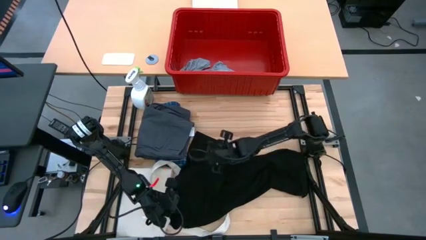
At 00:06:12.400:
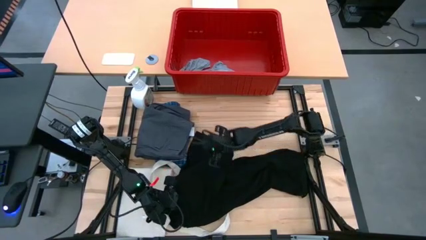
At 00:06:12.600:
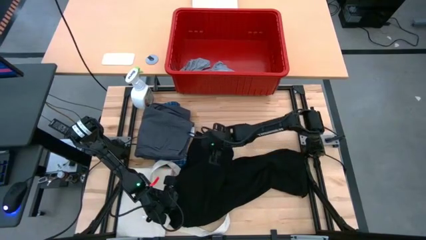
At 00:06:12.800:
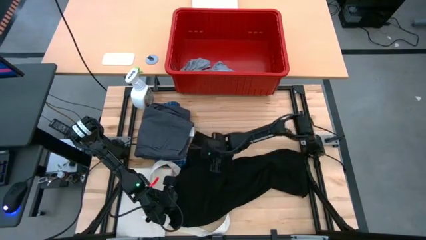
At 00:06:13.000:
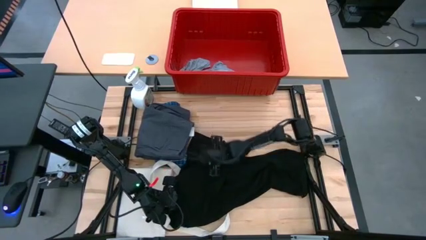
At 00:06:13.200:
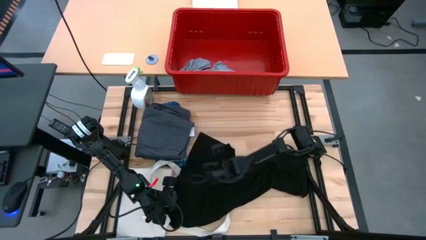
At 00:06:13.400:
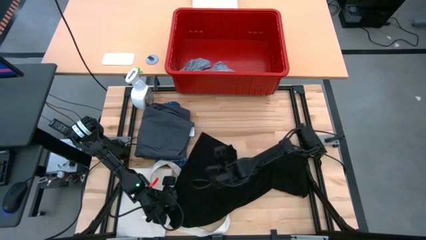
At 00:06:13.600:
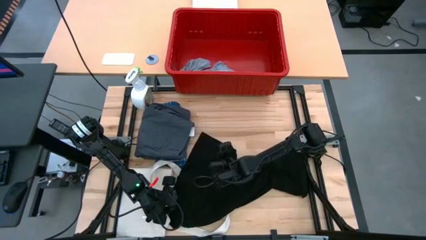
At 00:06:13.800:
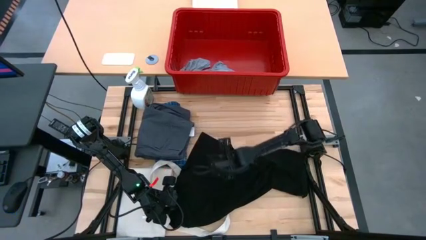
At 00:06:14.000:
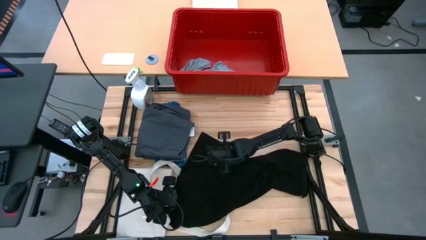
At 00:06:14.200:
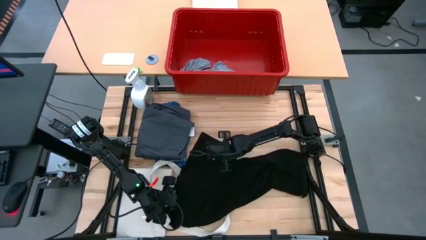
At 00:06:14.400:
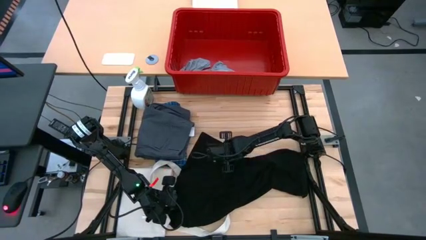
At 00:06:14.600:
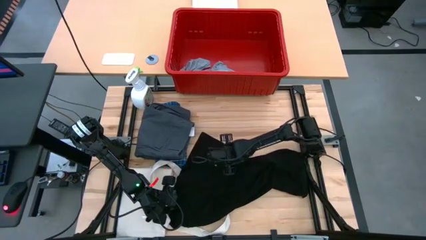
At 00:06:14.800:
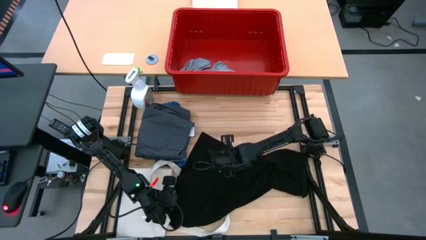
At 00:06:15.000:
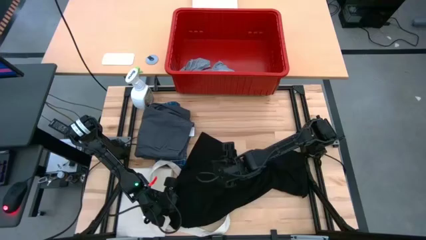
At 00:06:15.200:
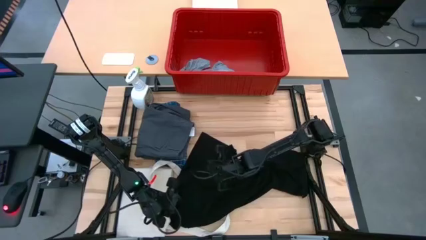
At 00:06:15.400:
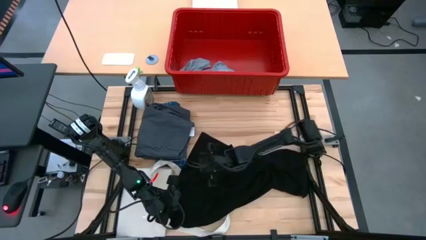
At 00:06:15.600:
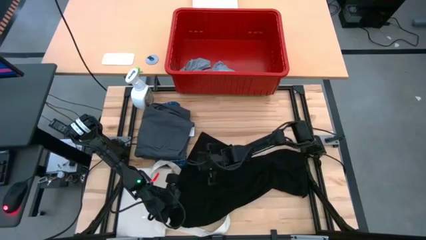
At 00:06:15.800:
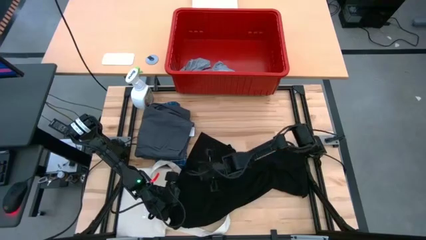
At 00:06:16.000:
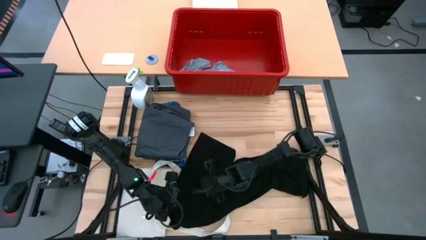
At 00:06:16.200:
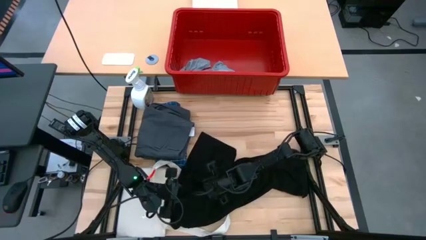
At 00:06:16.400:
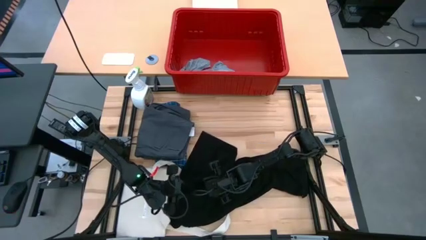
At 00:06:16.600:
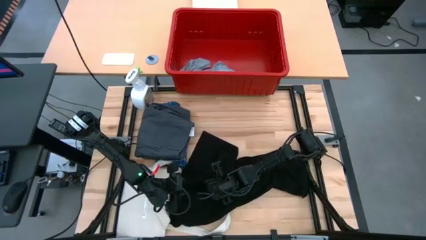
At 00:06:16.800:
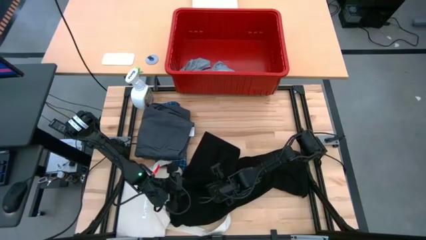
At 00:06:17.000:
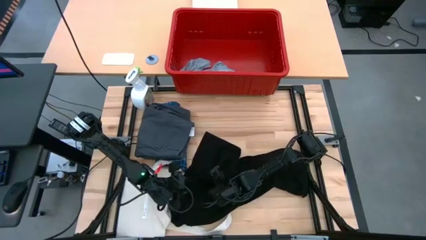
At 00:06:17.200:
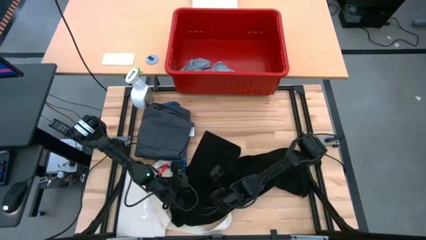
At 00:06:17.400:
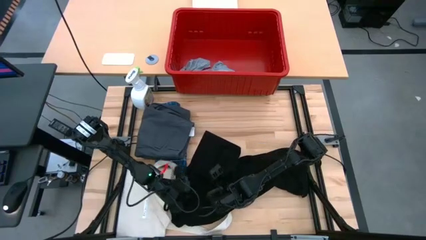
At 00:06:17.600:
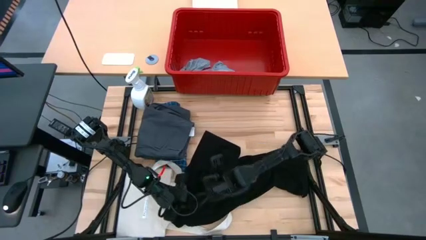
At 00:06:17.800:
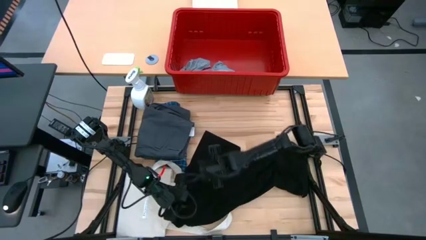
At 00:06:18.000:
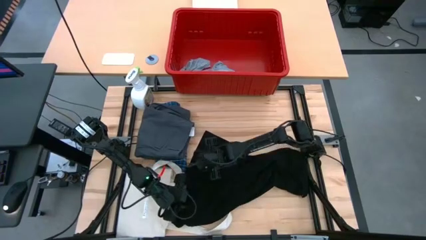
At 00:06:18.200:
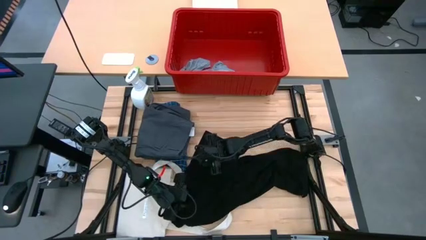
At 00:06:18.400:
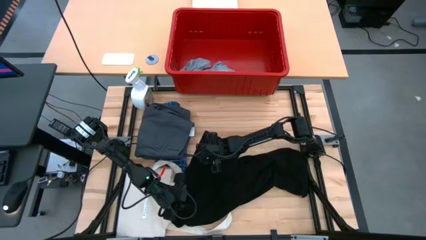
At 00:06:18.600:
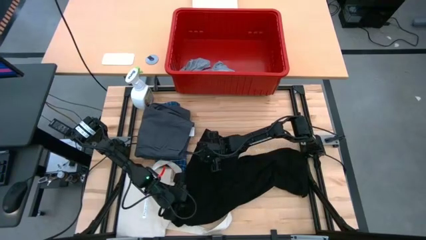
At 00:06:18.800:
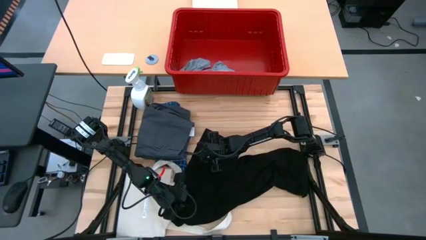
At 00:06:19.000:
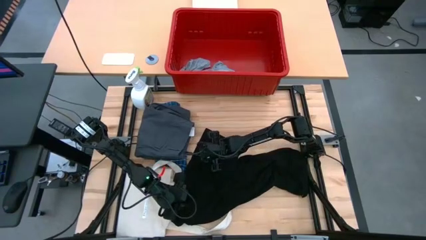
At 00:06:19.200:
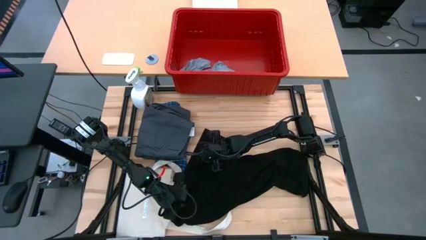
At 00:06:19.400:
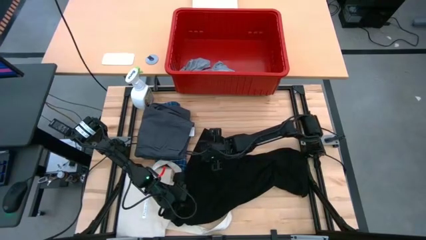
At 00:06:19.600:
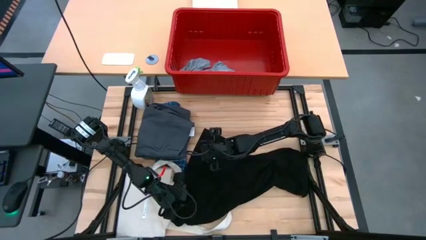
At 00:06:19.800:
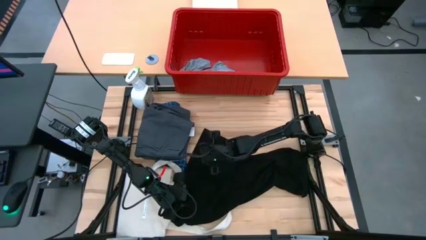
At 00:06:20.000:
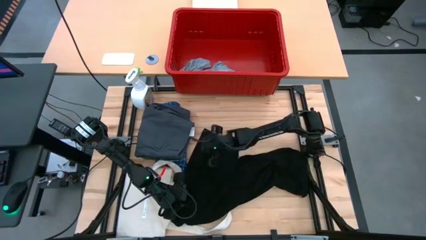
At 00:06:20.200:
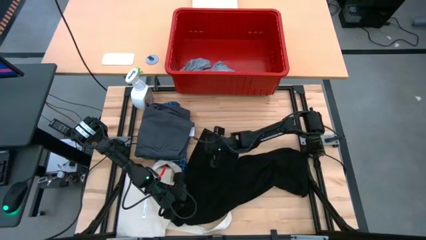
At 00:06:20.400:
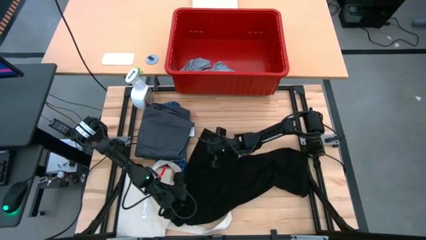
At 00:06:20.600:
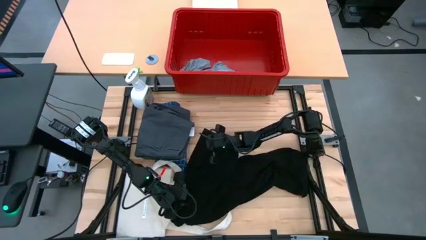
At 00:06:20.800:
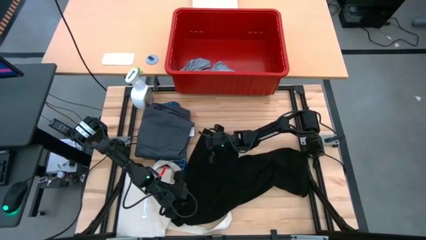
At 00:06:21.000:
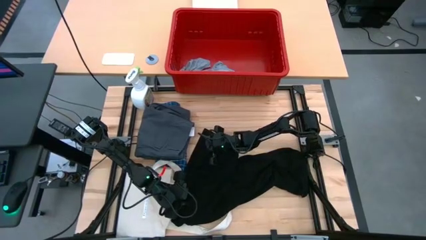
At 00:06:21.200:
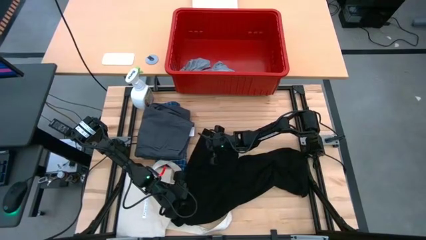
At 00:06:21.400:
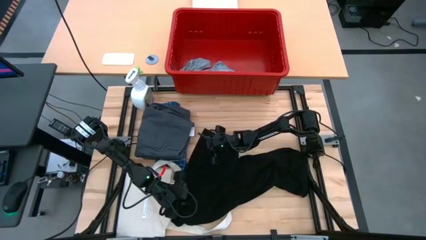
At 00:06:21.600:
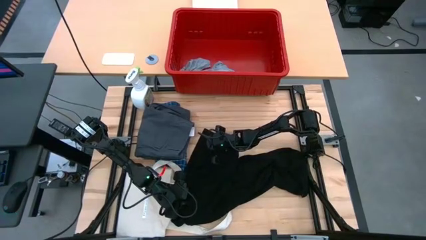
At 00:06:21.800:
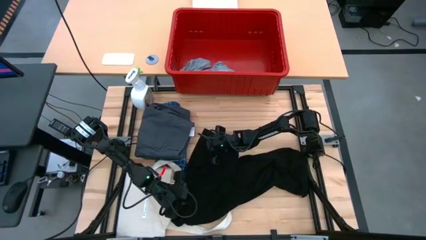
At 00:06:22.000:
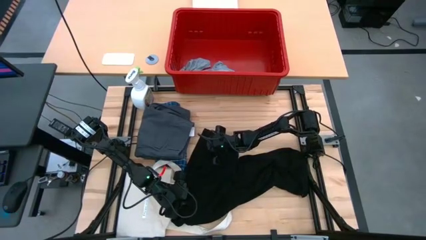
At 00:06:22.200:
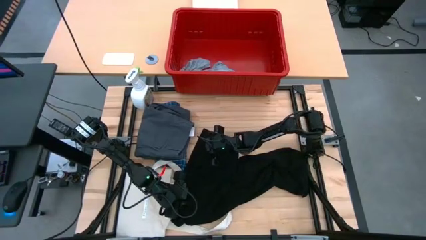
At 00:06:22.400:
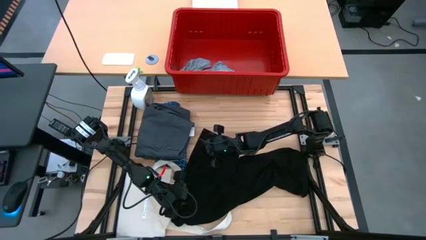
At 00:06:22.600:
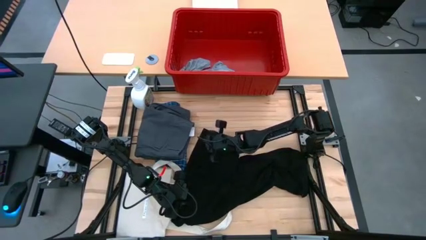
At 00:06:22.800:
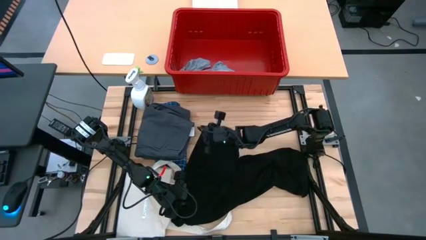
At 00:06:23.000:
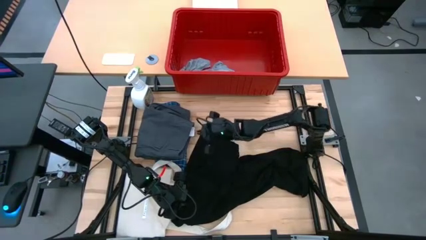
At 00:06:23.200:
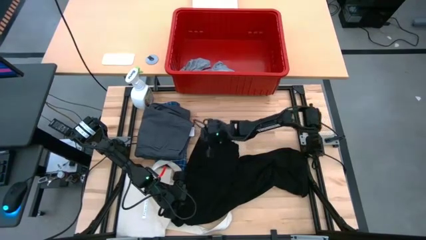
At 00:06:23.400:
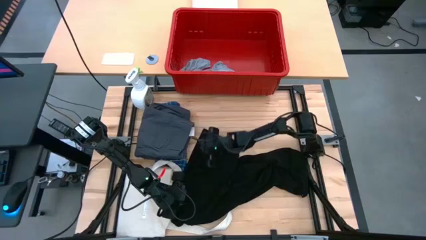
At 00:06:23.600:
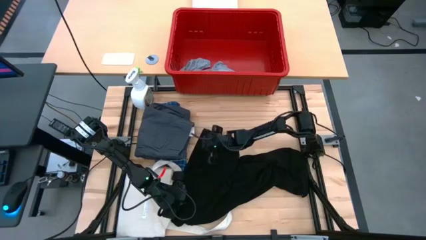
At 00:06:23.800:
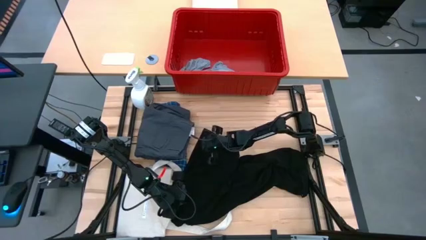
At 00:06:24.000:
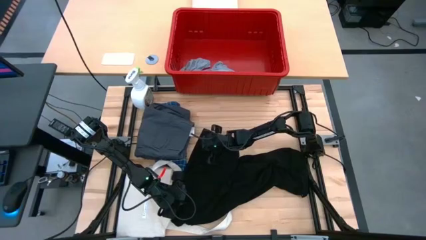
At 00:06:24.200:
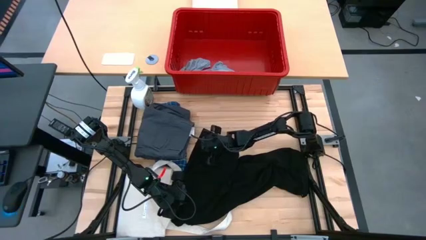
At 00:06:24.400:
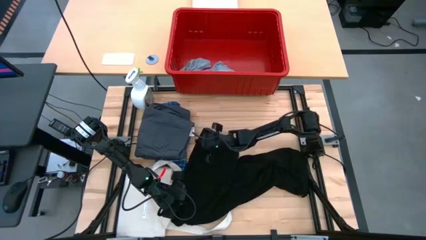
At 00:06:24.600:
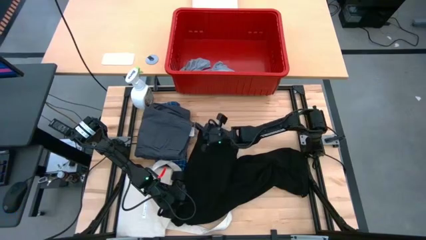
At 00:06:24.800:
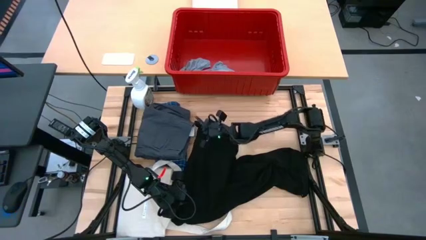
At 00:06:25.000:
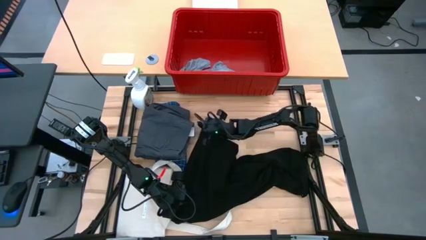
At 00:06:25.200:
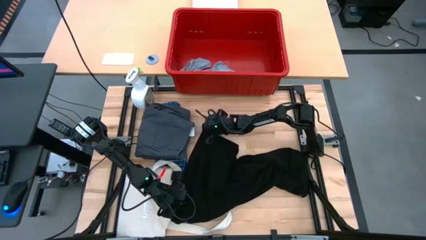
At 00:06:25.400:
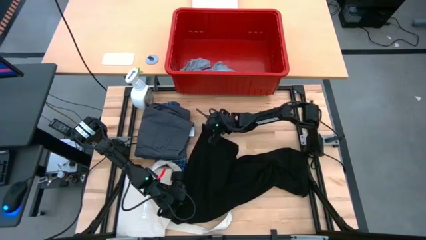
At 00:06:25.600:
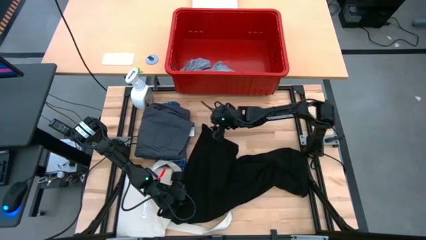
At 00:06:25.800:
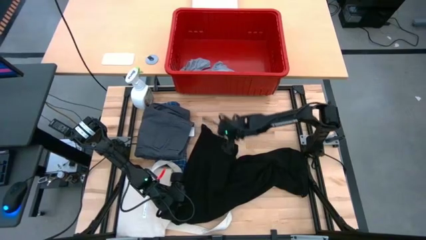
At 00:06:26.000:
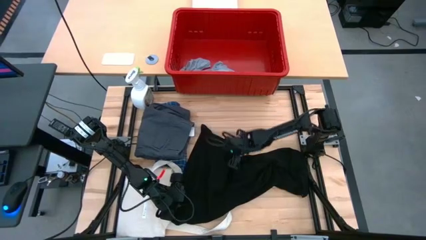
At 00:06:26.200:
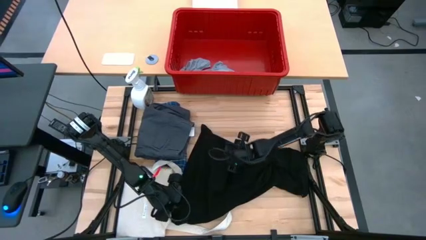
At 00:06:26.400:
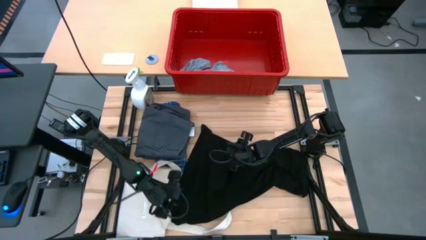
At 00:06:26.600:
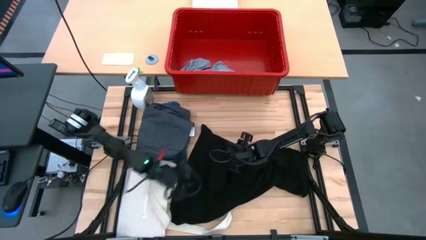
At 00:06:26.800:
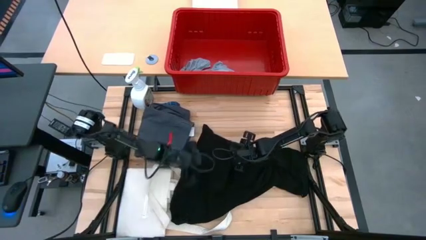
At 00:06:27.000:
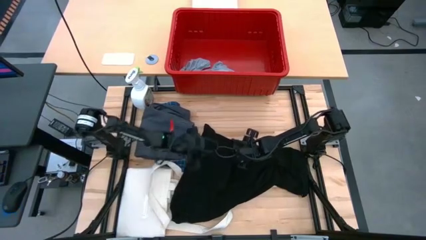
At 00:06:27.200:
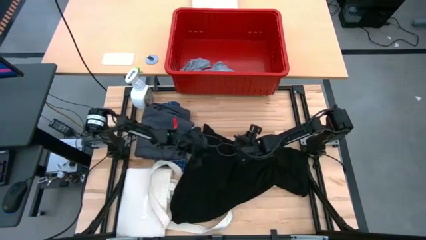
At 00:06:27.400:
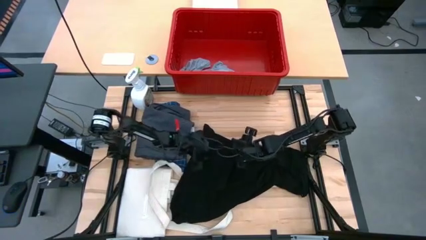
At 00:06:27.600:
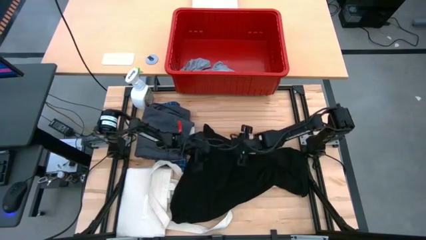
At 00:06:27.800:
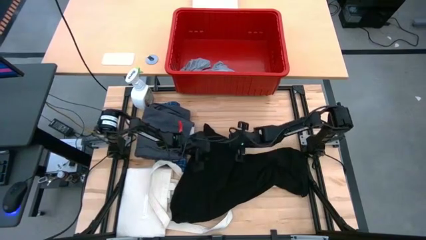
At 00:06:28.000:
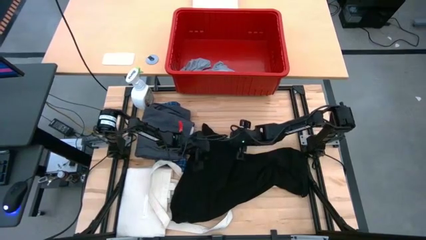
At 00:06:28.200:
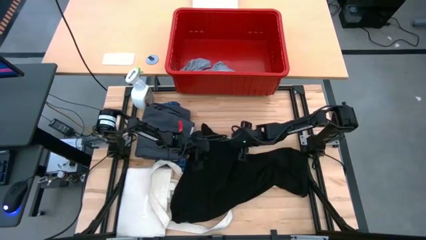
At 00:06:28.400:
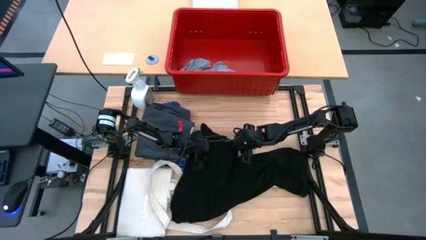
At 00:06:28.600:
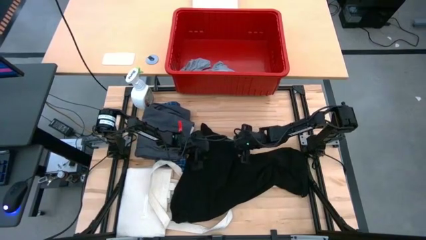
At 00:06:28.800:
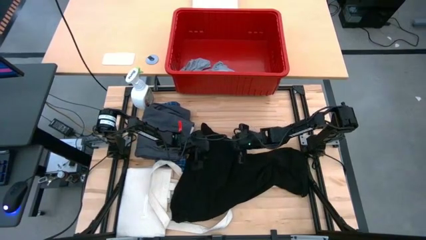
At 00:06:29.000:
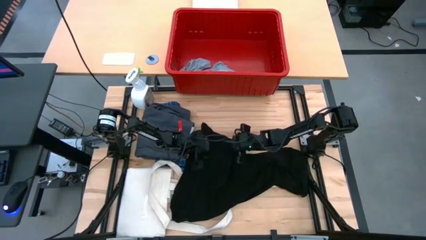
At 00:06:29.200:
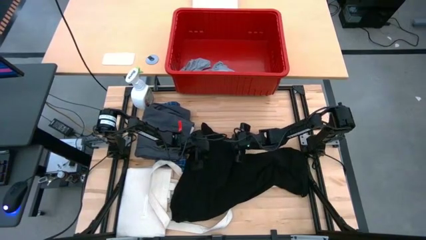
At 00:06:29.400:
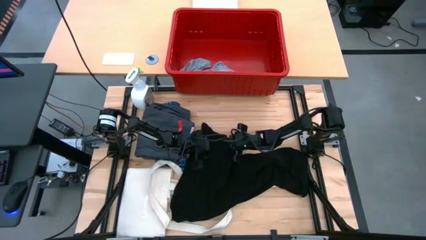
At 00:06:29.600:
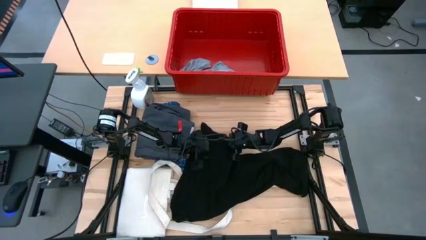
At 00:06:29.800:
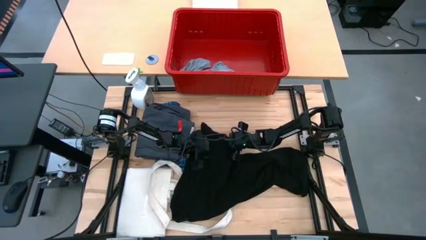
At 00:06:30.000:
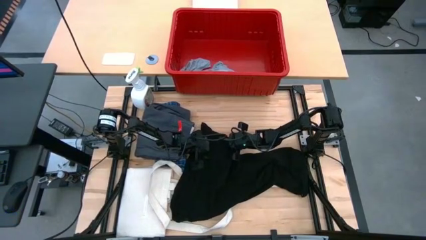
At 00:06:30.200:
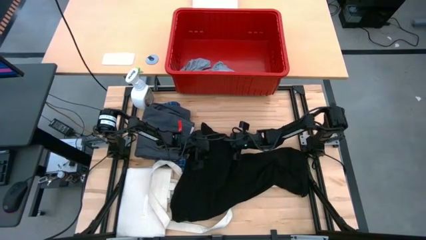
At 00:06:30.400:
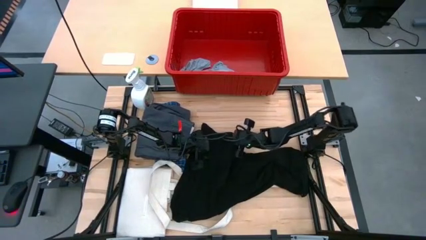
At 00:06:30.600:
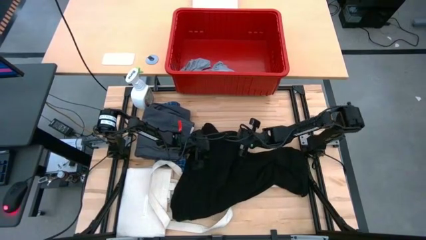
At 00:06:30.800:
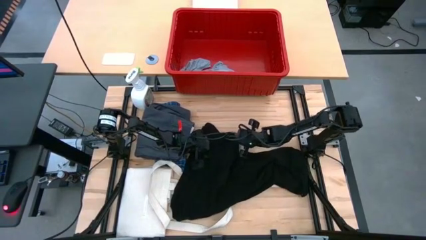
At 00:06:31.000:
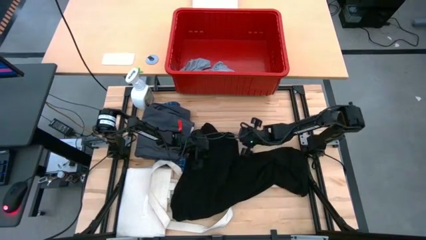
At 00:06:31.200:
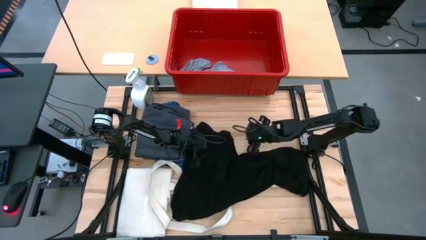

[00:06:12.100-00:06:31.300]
Task: Fold Laundry from Bin
Fold the black shirt
